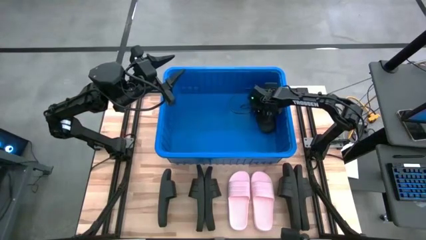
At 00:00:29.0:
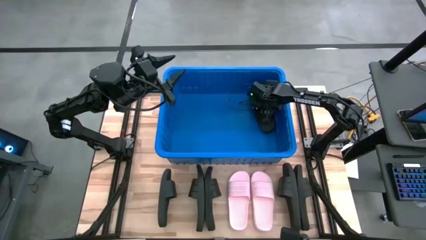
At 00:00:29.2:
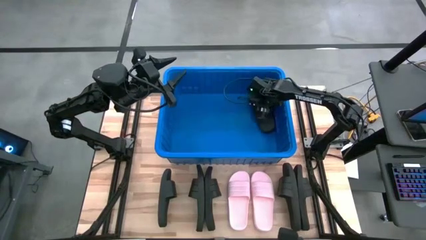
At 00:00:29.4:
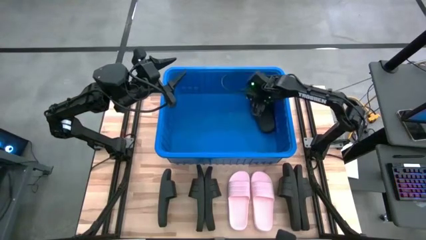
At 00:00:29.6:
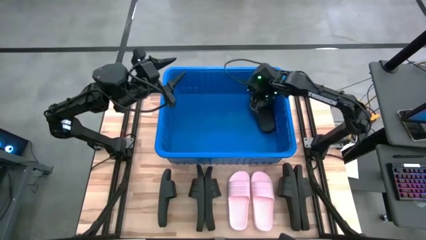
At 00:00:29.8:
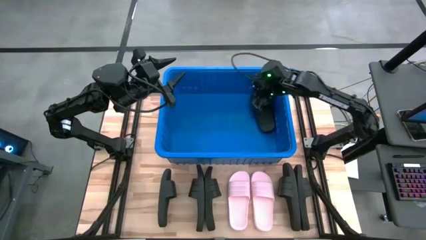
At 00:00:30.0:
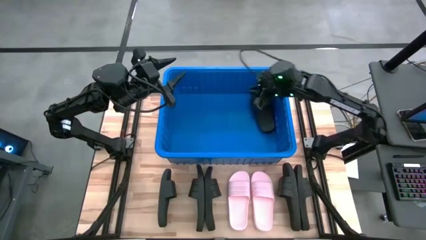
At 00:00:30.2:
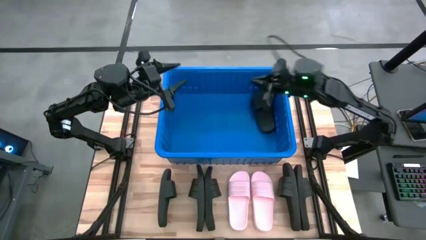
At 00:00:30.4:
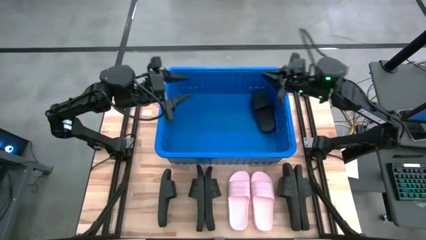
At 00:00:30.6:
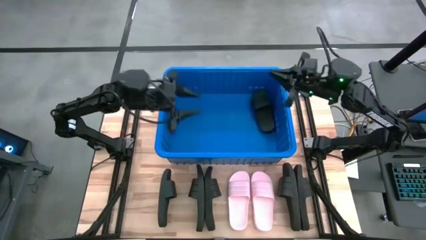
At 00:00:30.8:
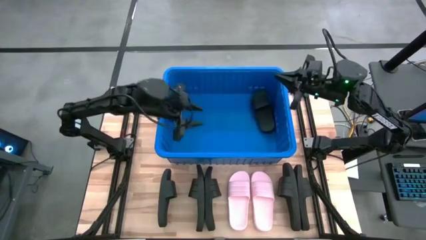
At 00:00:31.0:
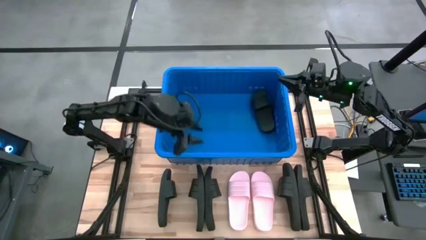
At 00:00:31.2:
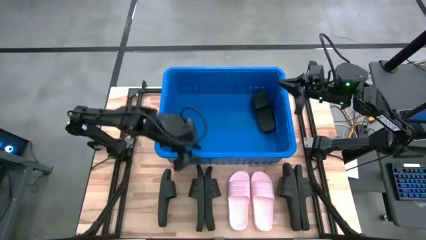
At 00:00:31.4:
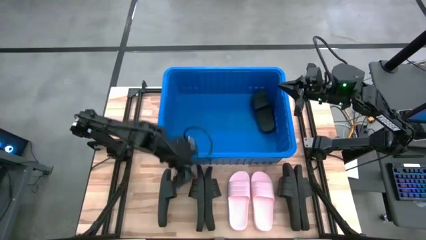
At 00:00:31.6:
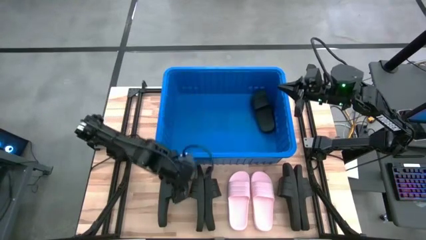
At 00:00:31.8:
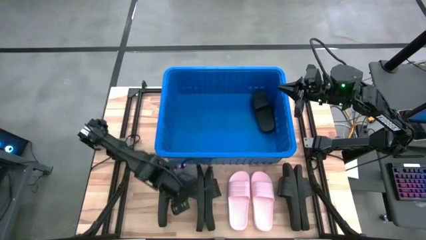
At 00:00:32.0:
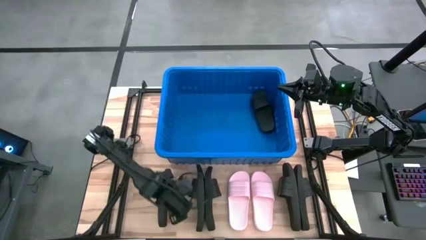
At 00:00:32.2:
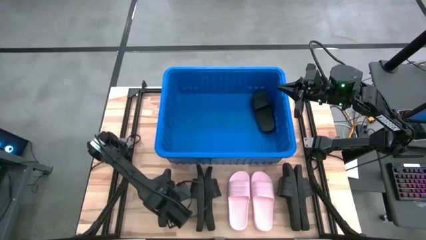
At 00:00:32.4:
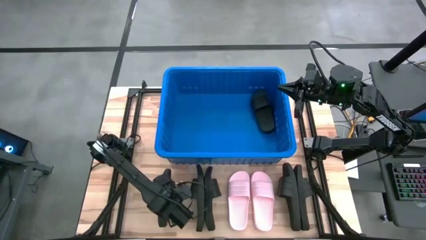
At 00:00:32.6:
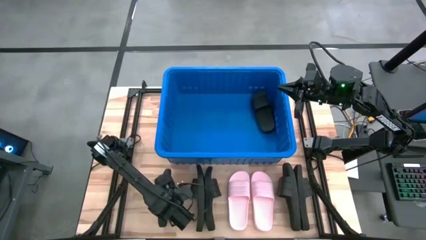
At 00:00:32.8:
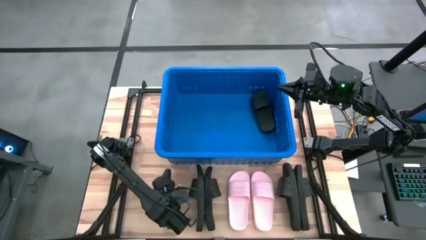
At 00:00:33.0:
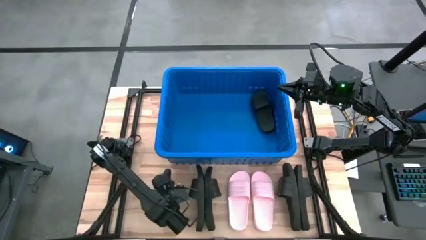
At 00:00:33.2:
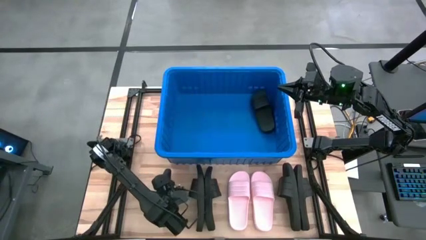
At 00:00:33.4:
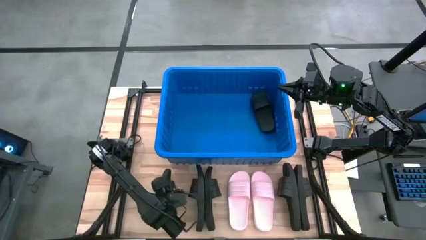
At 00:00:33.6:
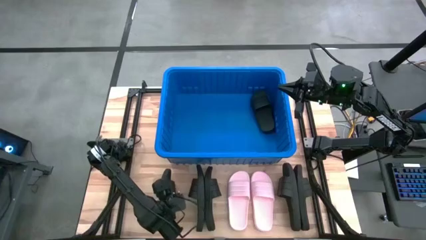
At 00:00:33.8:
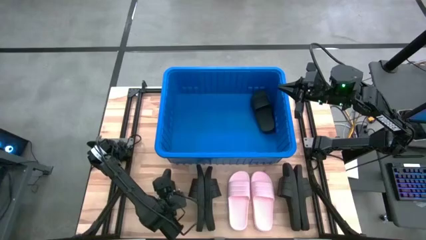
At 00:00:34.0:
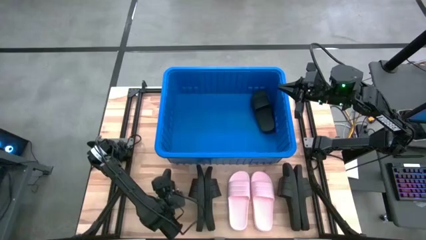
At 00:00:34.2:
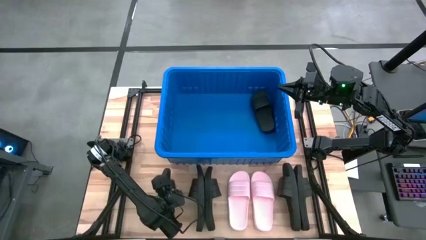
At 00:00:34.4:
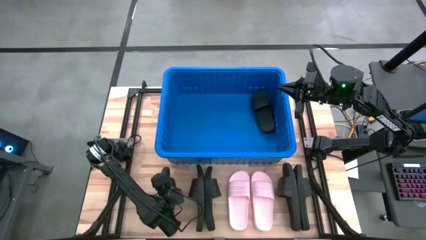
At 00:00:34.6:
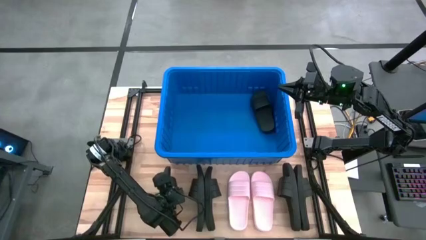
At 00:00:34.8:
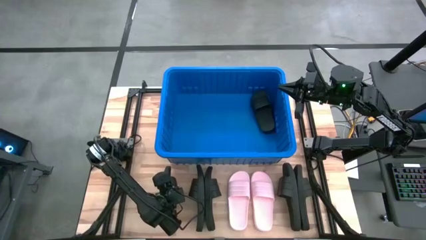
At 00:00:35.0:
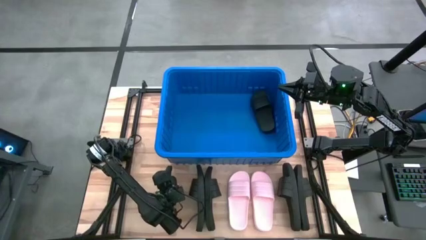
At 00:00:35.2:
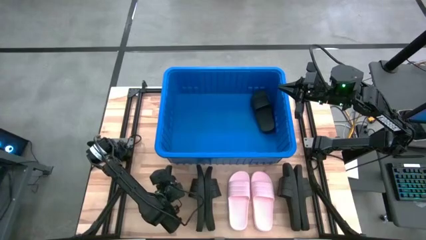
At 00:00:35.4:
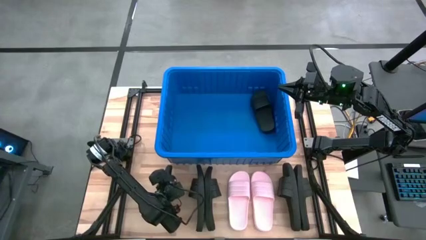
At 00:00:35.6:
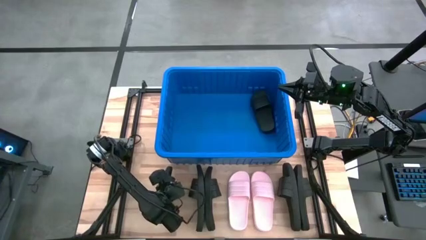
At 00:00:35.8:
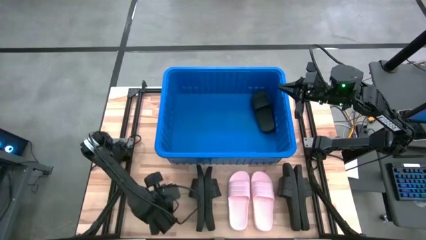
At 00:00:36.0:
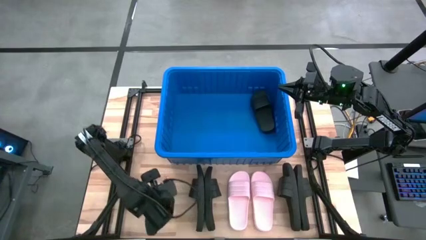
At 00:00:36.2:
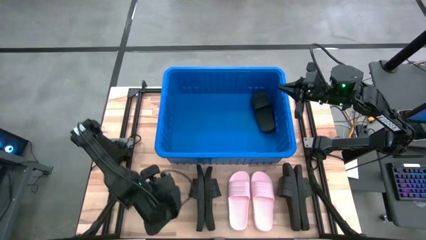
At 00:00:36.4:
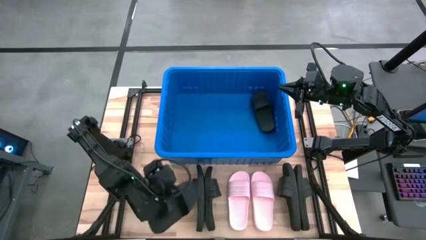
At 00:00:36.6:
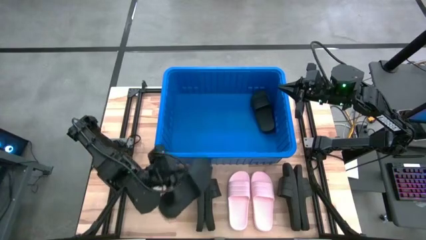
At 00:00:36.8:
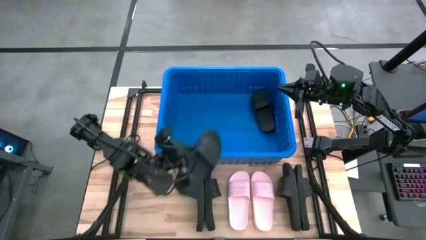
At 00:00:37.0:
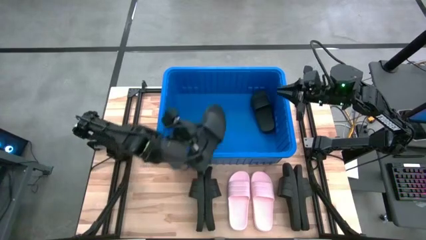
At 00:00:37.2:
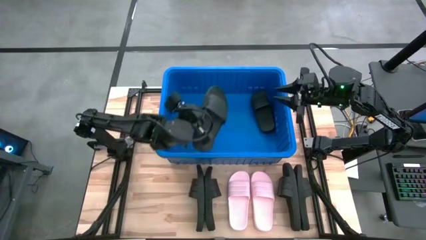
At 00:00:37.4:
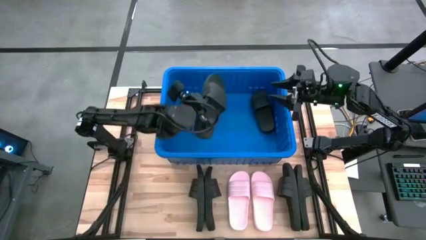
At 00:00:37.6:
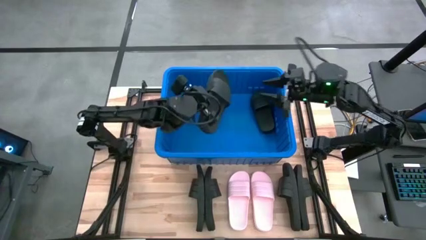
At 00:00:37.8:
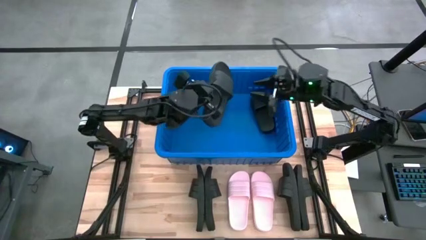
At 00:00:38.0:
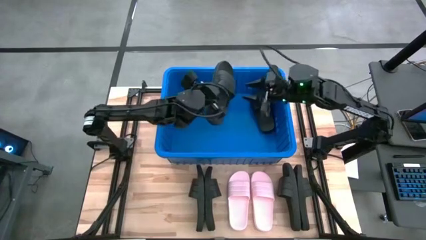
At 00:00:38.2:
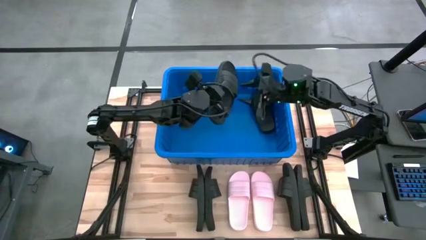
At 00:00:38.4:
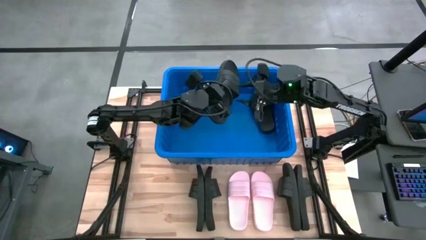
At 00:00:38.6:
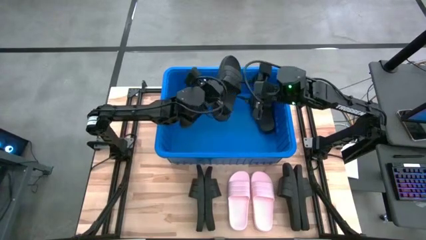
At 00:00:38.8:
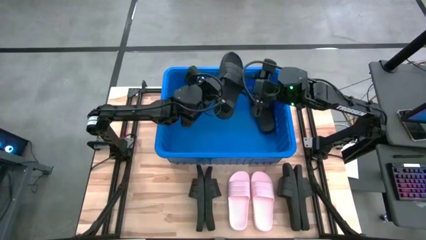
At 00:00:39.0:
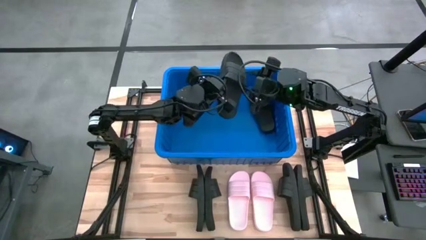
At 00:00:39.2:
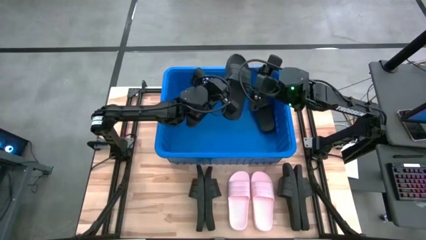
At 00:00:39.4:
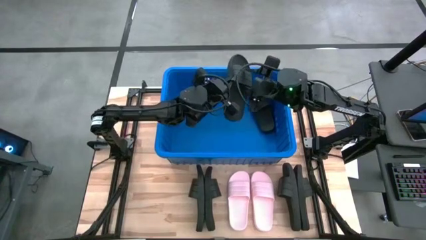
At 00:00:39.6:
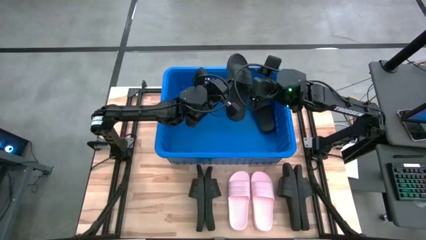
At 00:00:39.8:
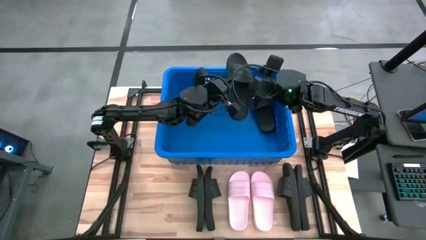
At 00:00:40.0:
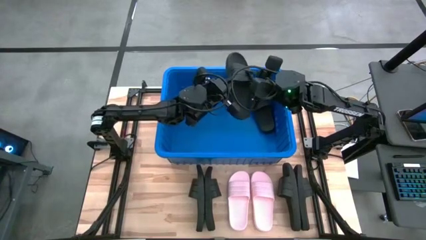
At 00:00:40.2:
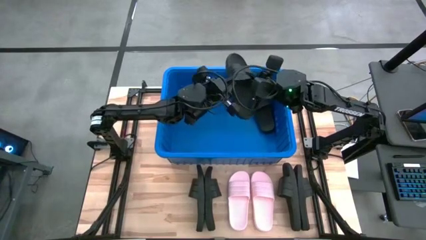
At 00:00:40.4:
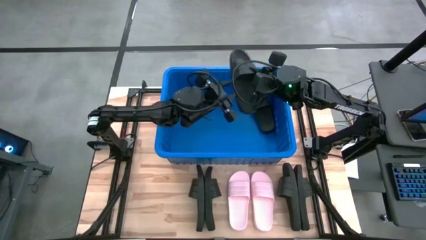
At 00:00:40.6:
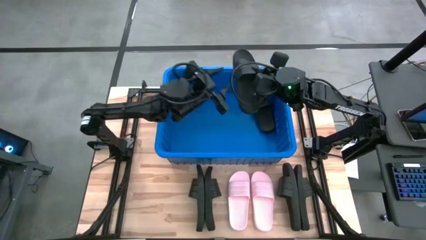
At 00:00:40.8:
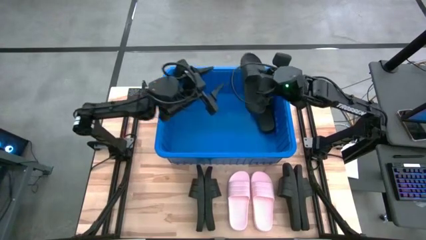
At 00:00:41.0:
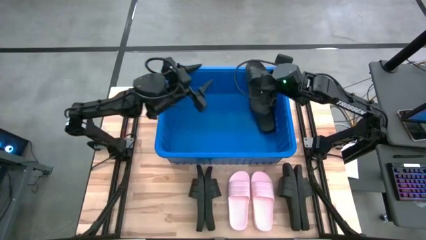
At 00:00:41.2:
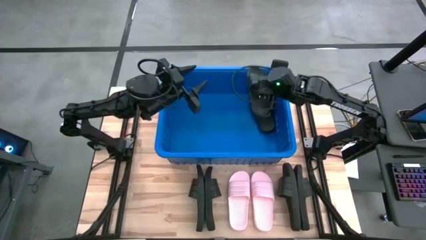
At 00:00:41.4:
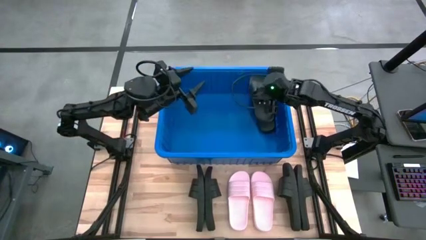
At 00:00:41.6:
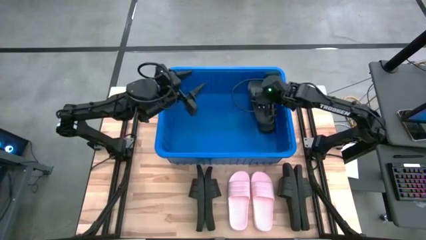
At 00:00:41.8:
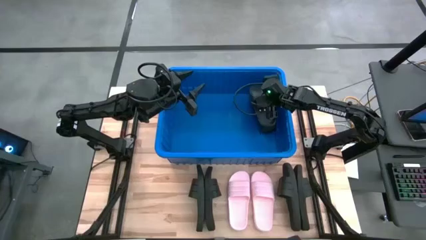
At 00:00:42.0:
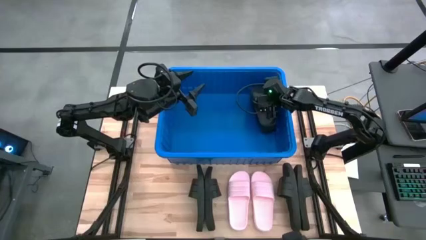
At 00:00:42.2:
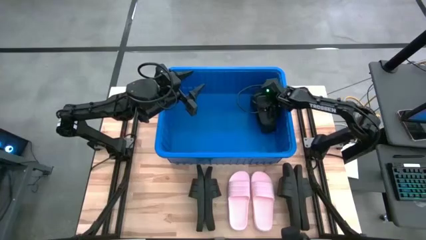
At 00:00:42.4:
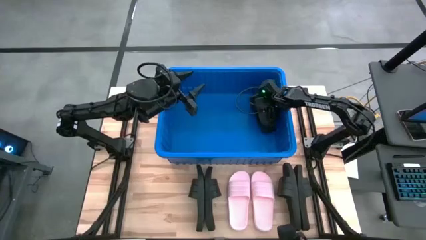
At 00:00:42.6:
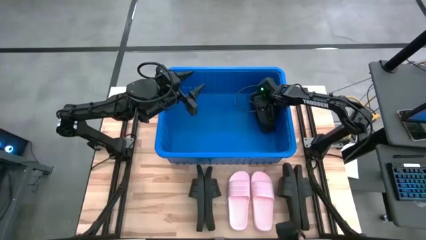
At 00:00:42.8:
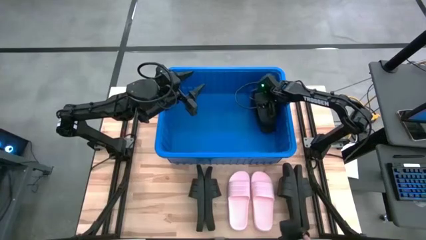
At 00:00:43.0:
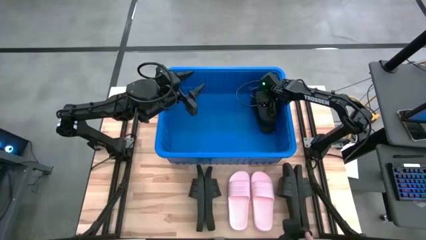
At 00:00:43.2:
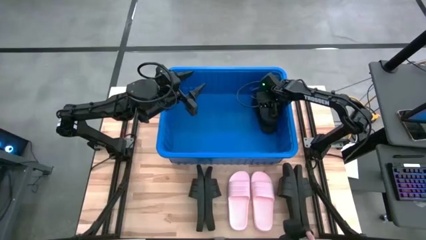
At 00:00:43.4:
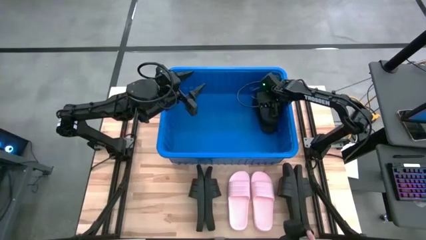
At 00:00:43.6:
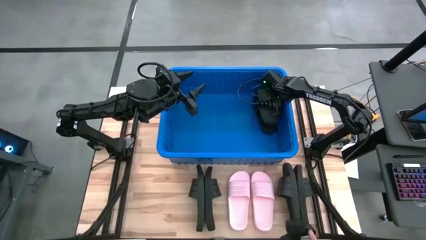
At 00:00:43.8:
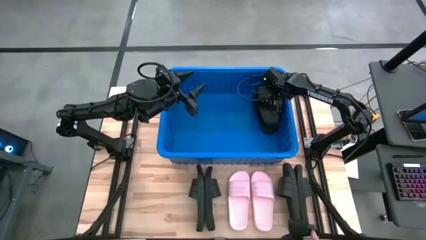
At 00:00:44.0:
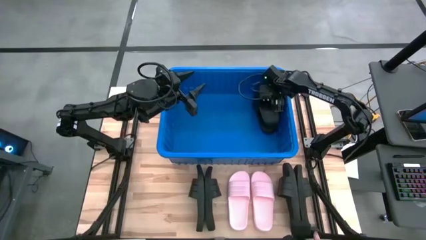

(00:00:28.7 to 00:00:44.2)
Task: Pick and place slides into bin
Put the black slide into the blue bin
